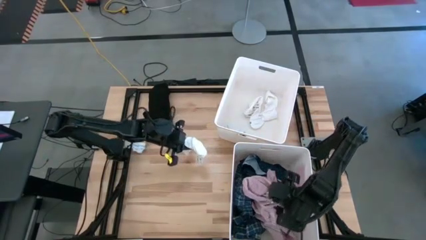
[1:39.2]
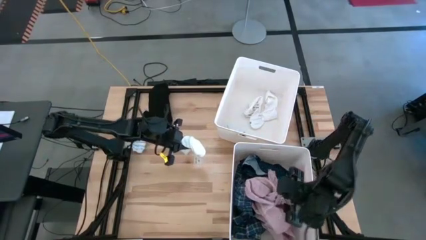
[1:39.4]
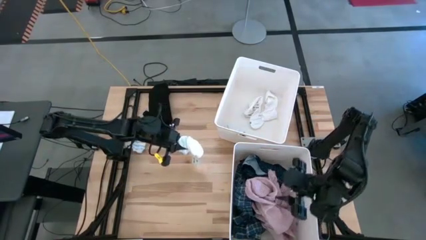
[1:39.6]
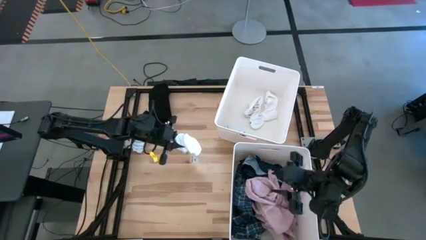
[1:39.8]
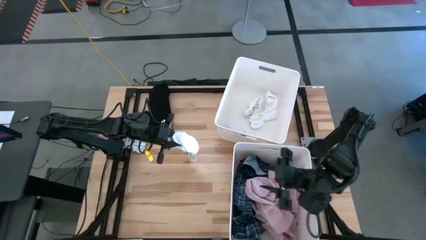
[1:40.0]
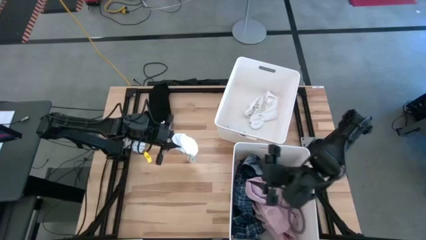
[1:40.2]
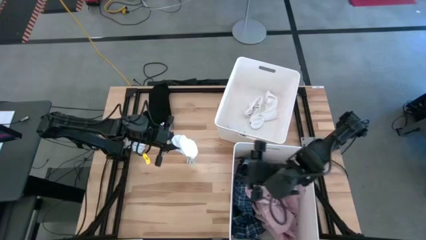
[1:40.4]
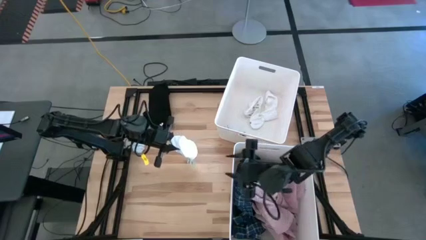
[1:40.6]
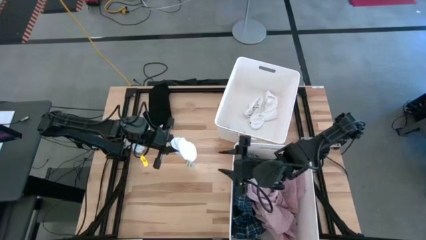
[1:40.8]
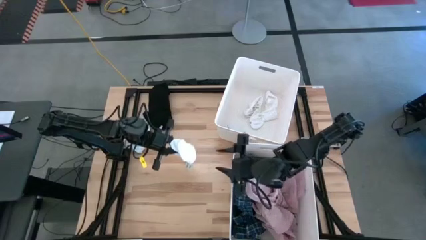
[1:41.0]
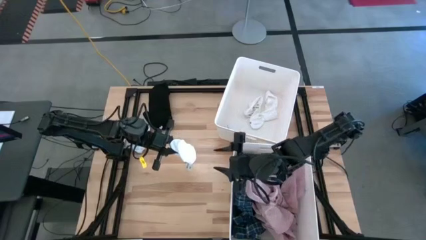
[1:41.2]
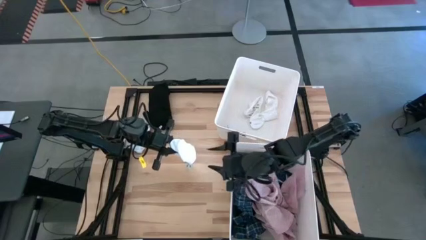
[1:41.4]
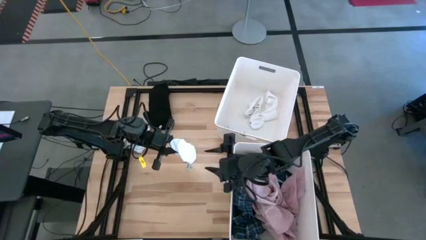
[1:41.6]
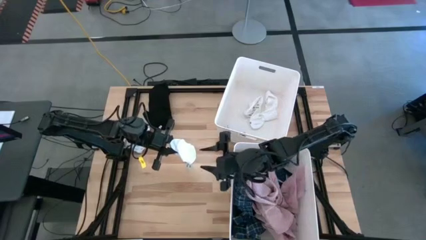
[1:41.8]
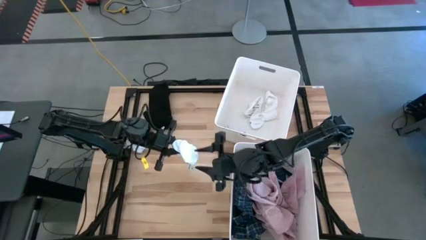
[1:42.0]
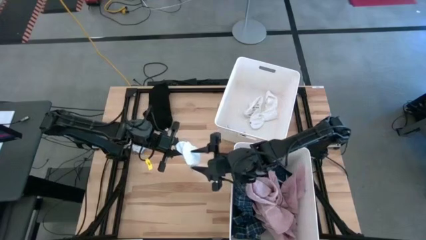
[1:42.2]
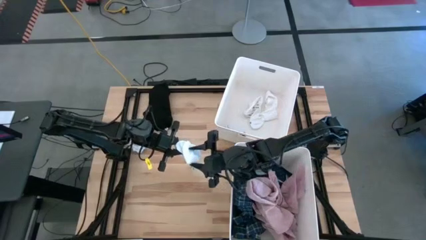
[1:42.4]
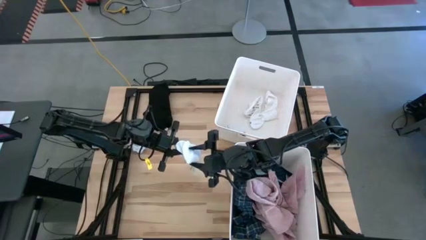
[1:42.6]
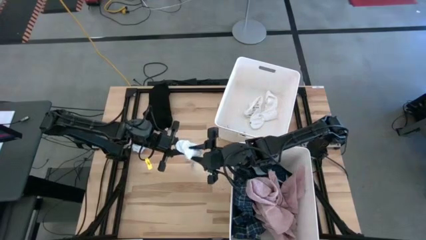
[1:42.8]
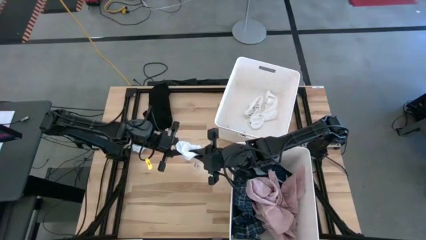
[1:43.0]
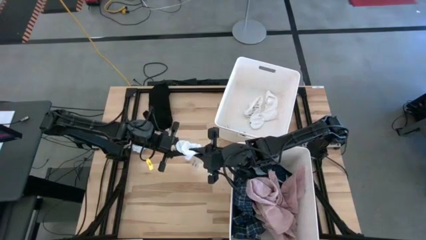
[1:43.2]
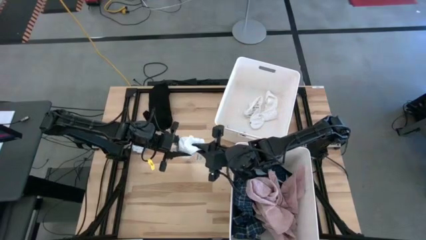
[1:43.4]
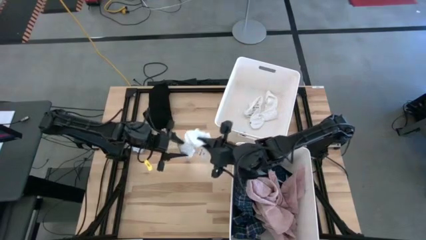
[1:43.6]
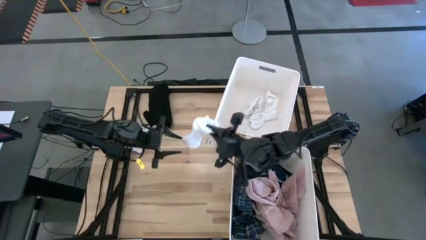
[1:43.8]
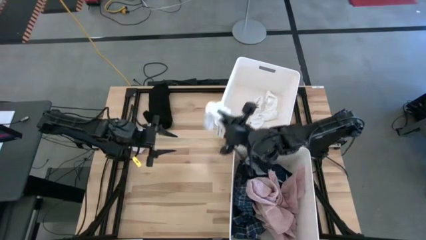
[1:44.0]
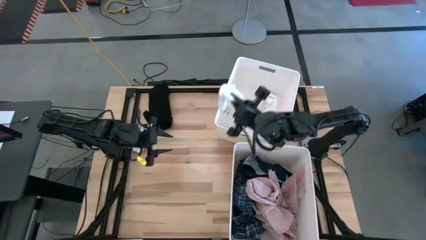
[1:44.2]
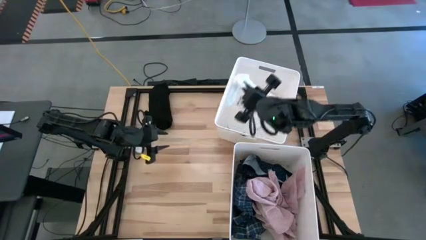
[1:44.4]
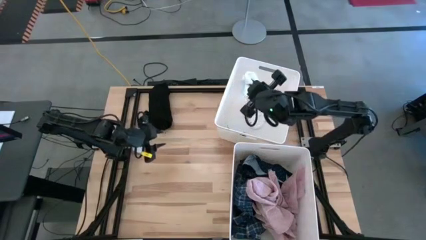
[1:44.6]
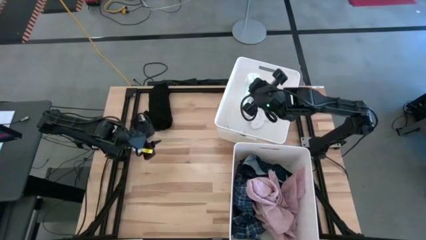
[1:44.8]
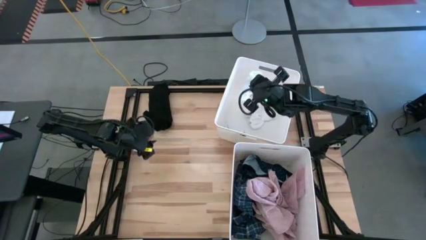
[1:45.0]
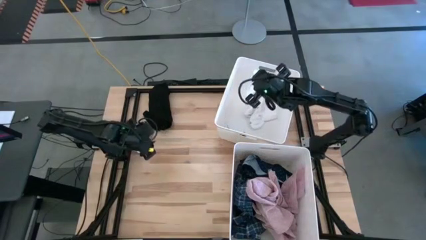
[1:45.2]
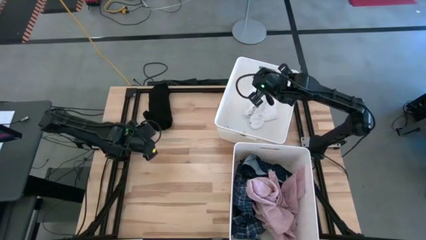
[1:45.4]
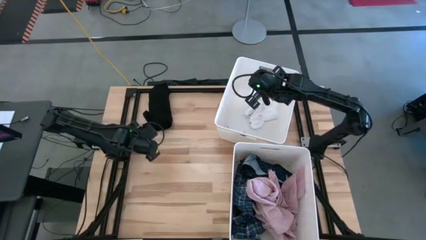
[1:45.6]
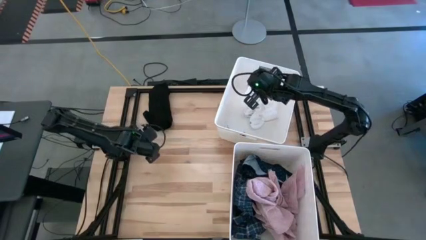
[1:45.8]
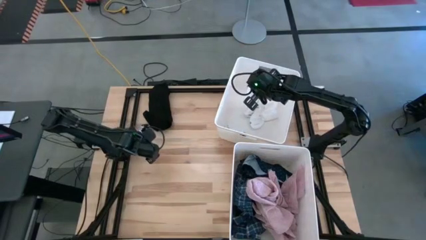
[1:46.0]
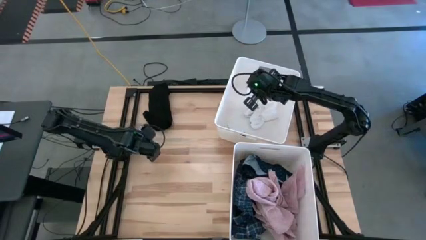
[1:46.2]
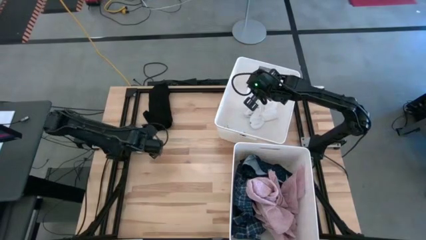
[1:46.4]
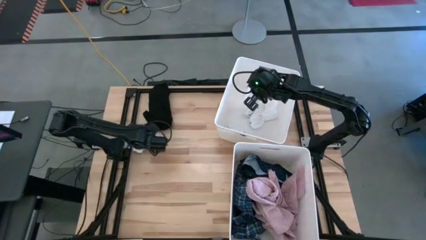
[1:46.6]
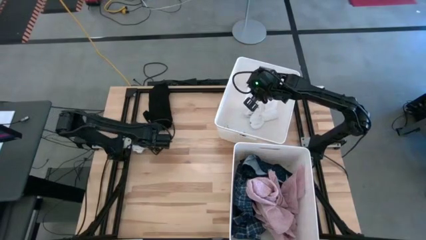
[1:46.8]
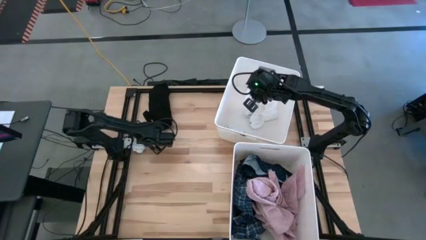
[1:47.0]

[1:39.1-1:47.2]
Task: Sort clothes
Put the white sock into the top white laundry bin

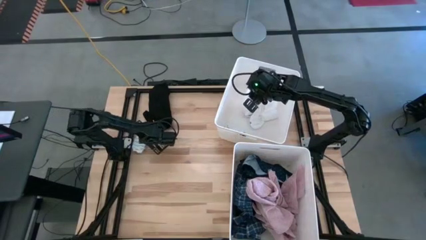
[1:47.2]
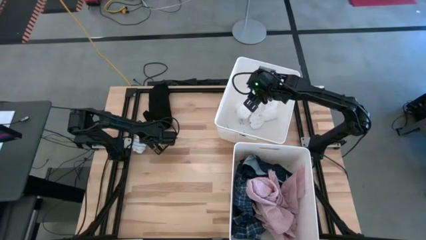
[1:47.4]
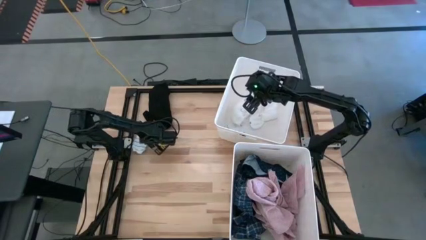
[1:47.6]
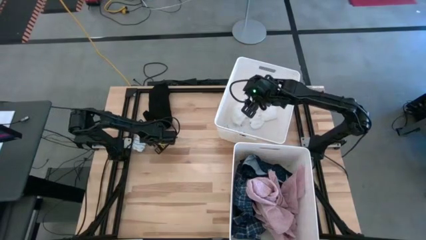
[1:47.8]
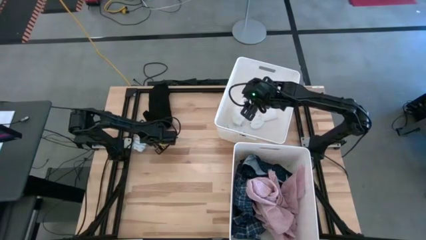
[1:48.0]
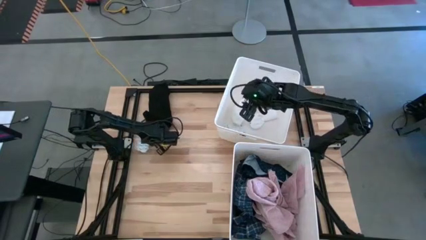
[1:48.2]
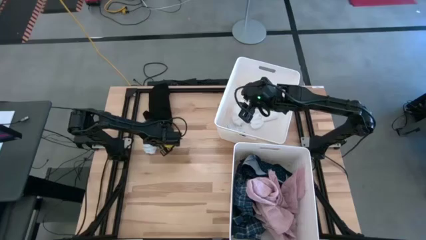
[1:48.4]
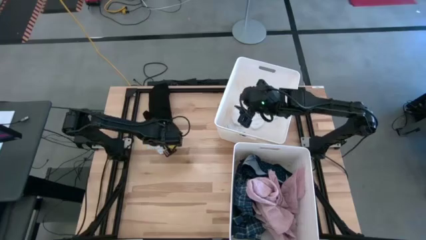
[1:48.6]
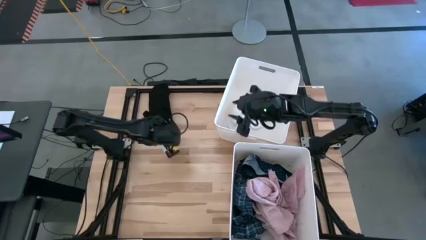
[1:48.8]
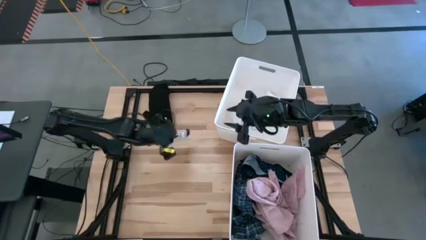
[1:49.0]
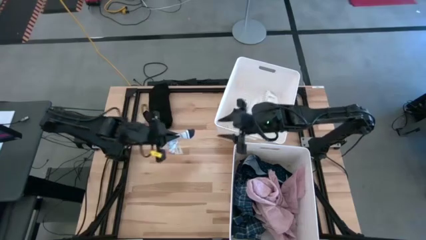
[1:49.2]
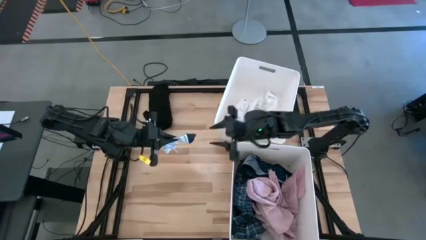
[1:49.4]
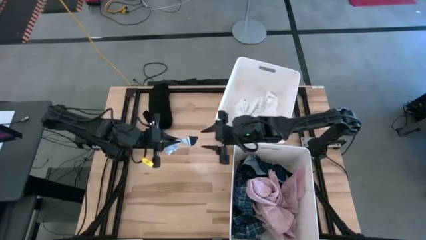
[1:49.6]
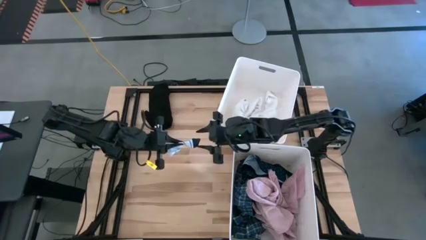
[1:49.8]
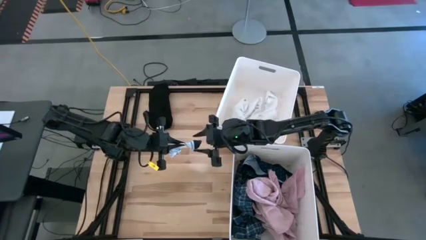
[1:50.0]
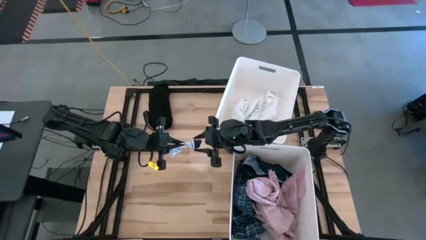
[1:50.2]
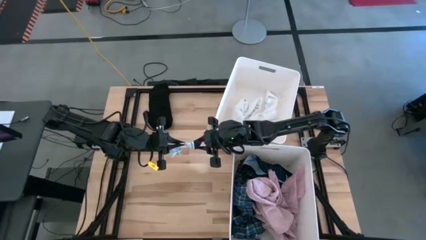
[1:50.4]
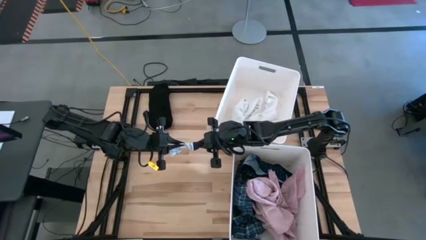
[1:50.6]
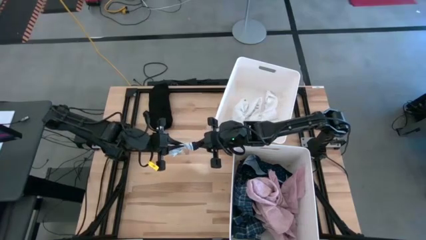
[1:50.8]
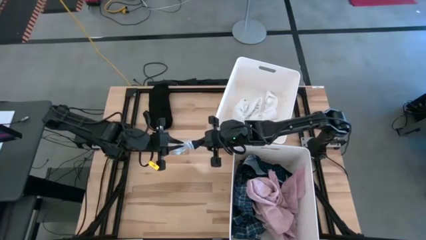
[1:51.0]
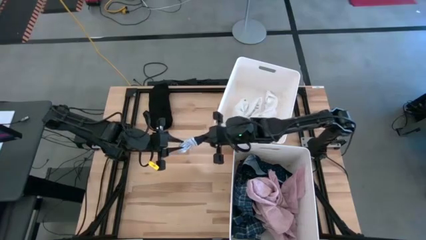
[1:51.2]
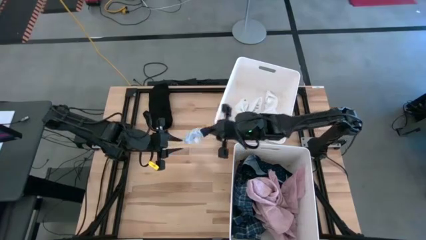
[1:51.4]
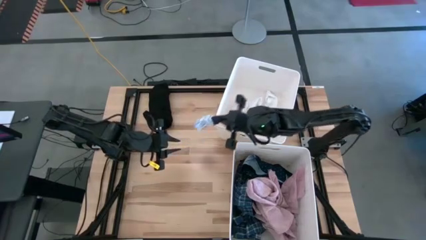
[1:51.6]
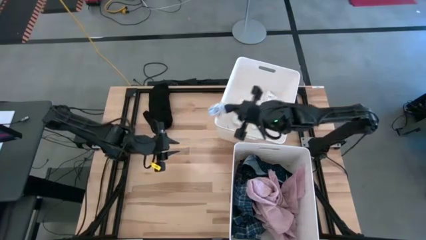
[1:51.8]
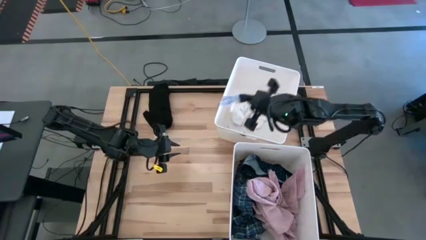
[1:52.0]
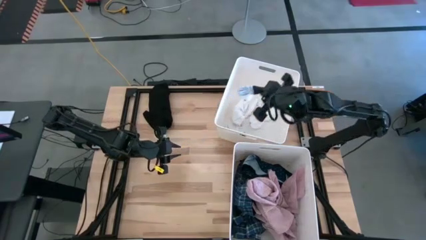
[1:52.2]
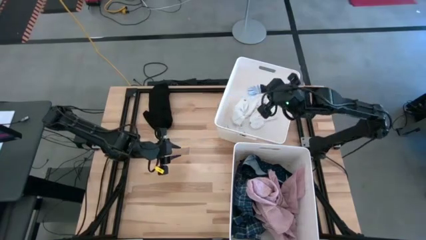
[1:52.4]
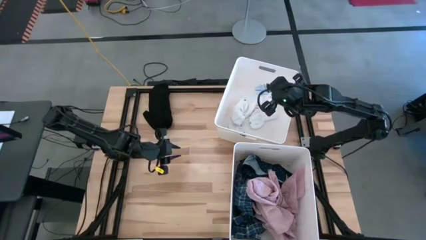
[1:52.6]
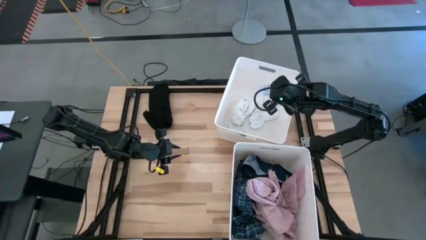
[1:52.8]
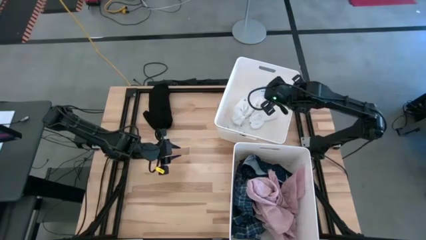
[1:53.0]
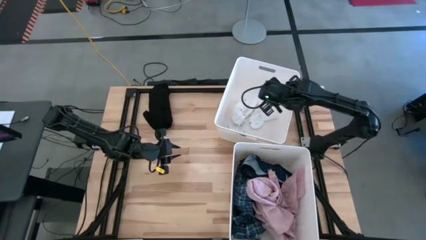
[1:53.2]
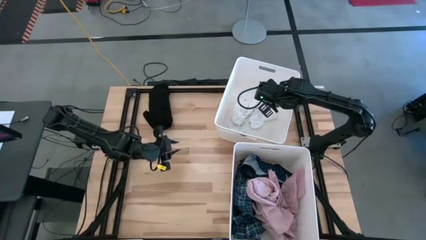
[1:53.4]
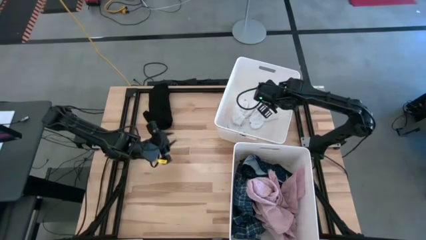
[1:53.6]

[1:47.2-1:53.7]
Put the white striped sock into the top white laundry bin

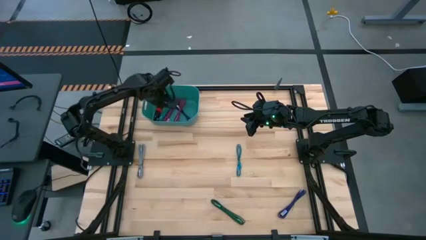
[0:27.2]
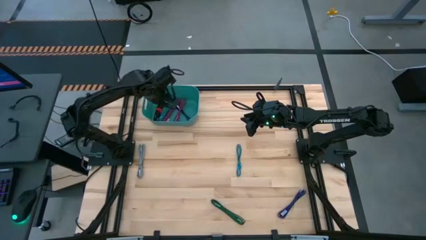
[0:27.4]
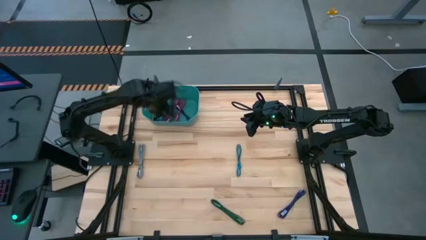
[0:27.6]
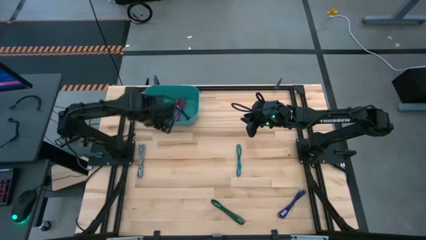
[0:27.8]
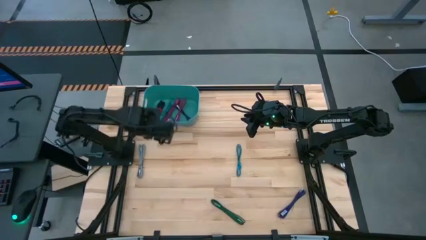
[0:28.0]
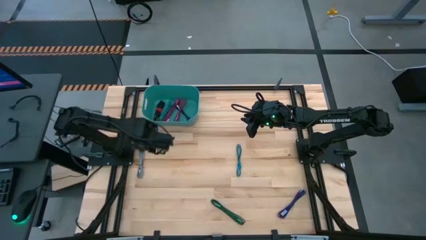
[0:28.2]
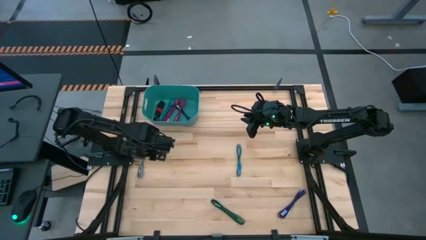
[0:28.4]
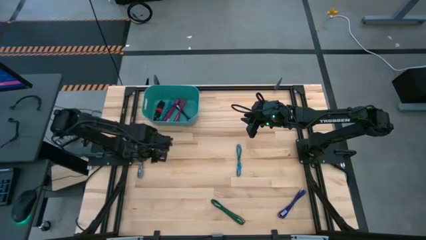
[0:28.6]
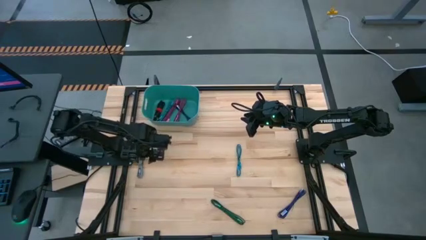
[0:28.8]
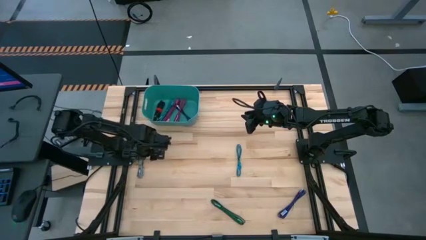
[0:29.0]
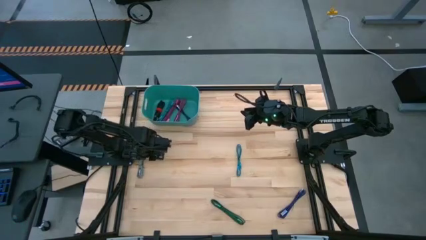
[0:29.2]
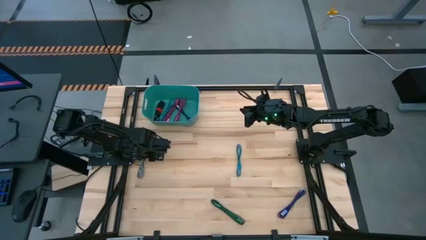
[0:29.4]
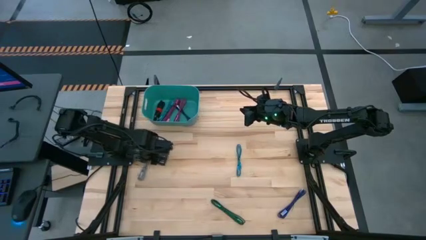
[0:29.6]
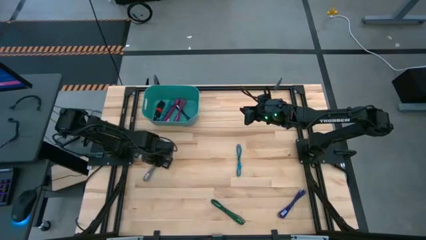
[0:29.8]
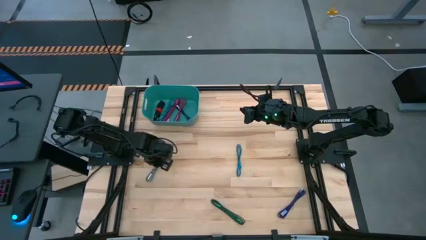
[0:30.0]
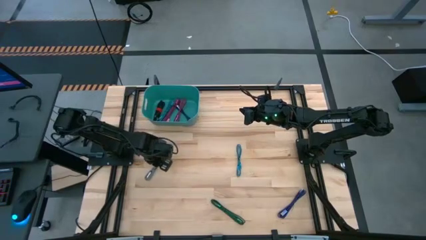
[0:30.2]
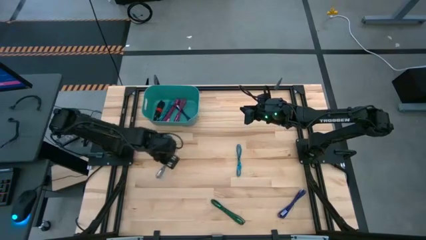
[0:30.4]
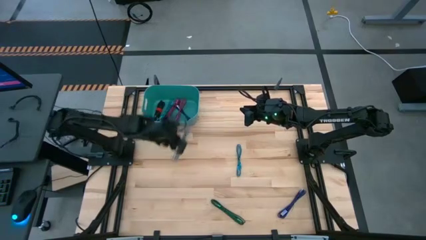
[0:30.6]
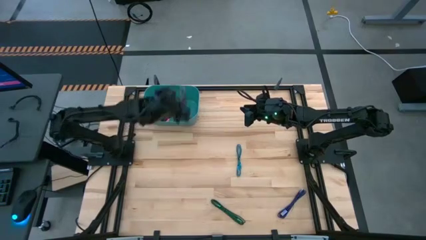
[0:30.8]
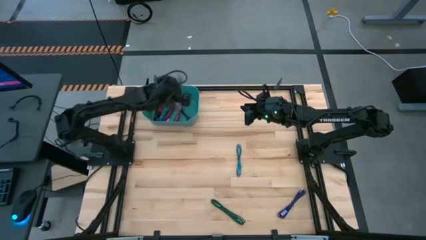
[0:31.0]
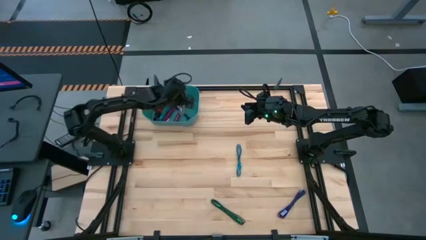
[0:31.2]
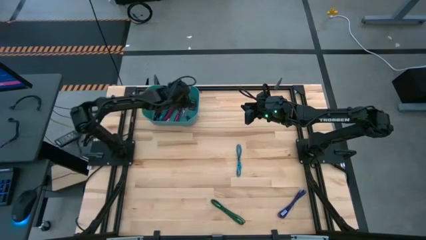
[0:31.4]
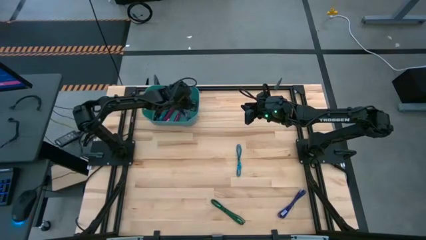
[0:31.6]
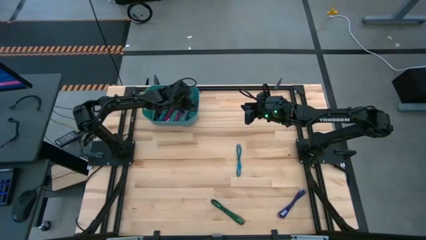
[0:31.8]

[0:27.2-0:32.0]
Task: Pick and place USB-C Cables
Put the black and white USB charger cable into the green bin
